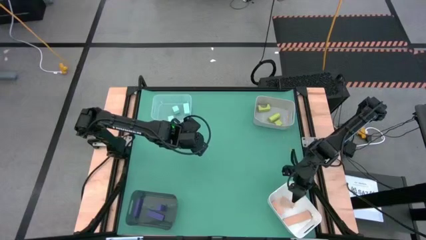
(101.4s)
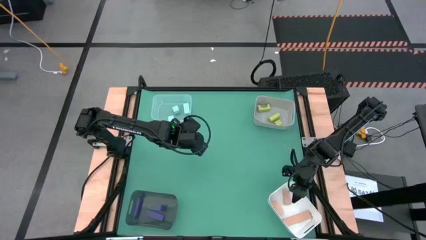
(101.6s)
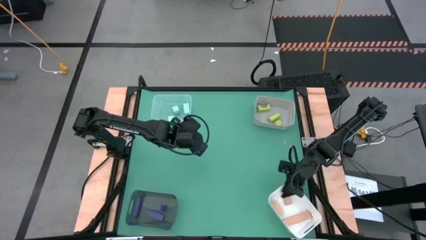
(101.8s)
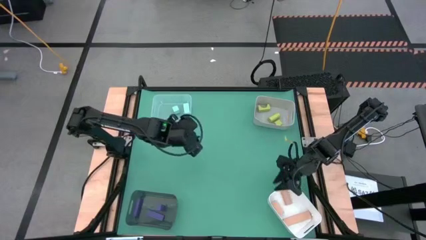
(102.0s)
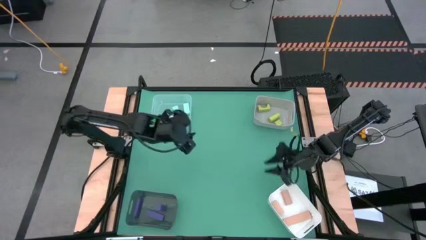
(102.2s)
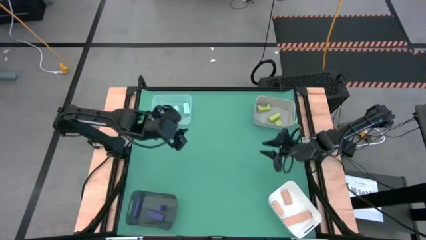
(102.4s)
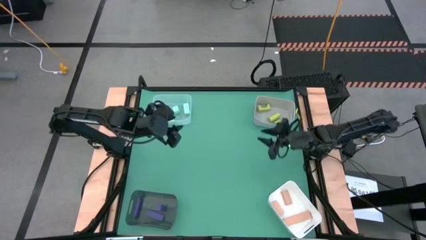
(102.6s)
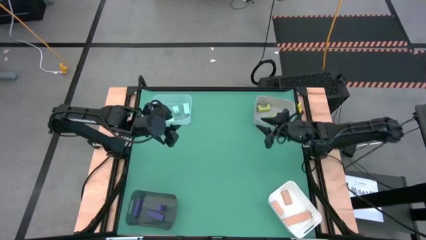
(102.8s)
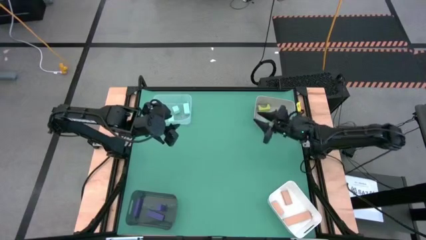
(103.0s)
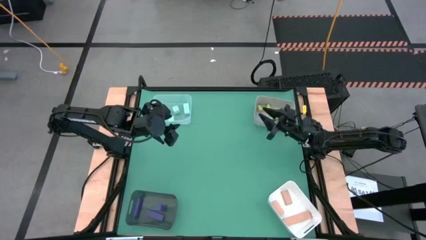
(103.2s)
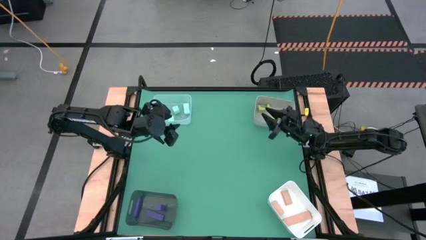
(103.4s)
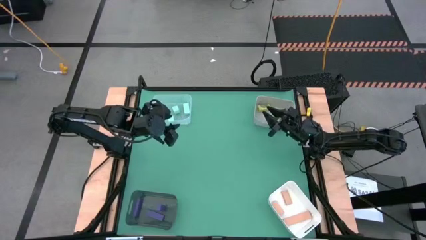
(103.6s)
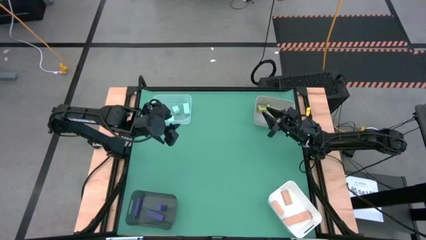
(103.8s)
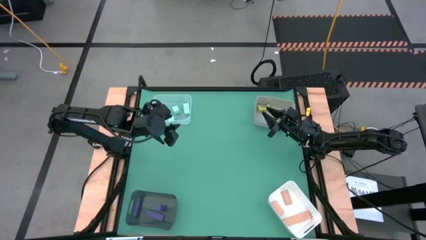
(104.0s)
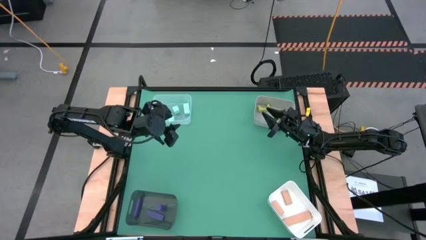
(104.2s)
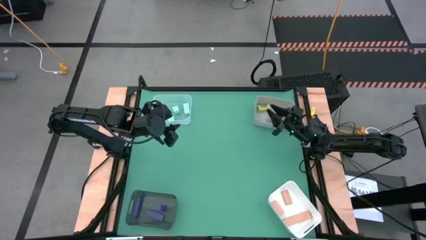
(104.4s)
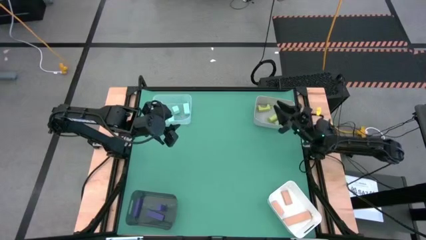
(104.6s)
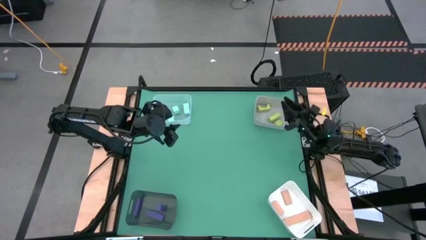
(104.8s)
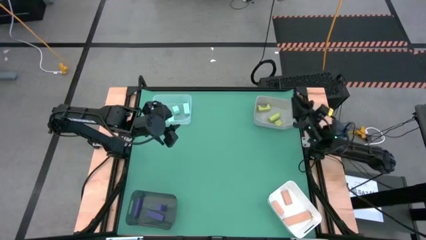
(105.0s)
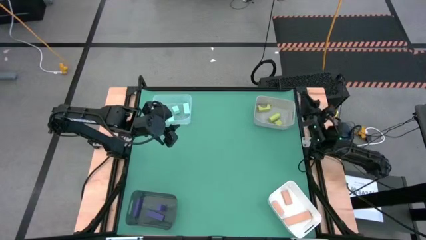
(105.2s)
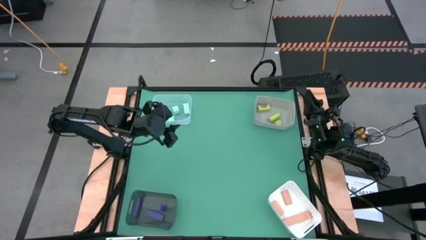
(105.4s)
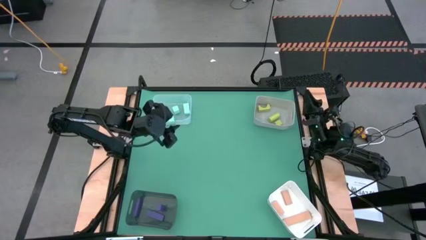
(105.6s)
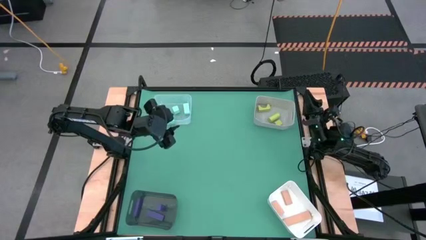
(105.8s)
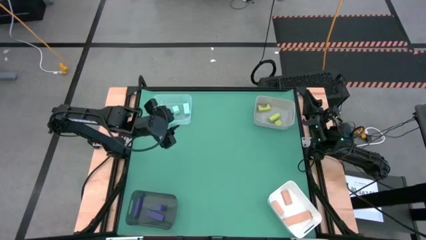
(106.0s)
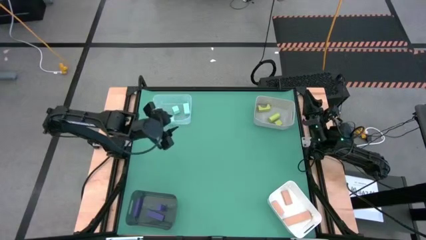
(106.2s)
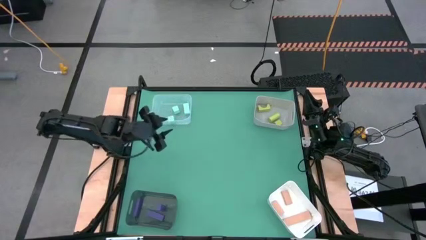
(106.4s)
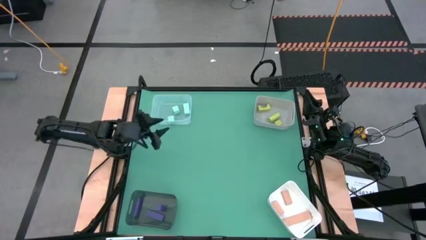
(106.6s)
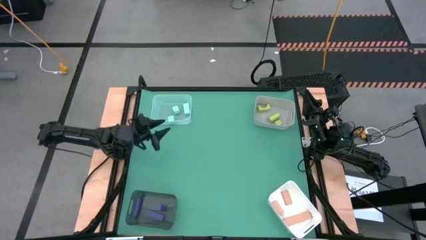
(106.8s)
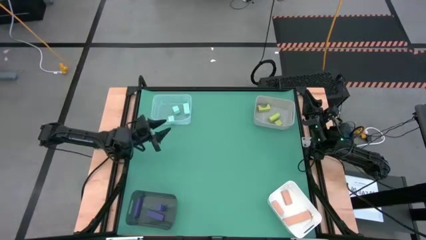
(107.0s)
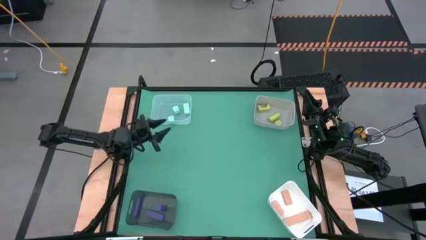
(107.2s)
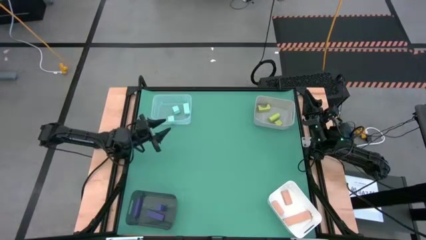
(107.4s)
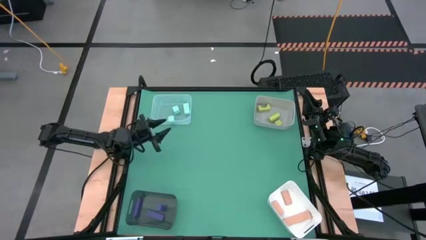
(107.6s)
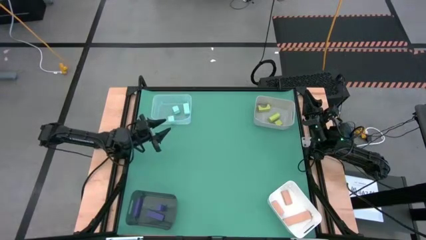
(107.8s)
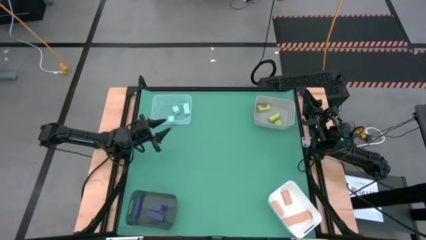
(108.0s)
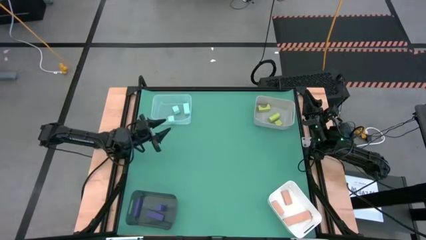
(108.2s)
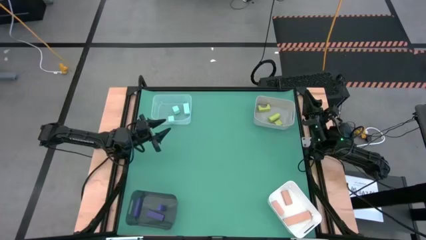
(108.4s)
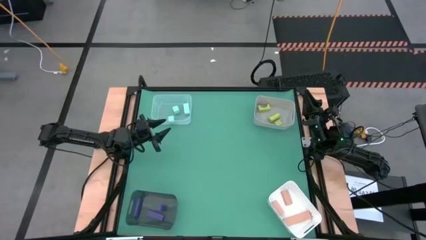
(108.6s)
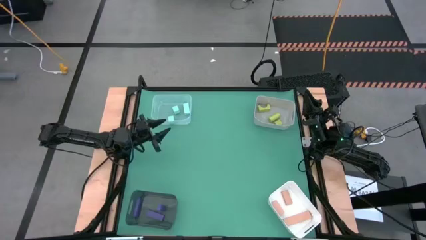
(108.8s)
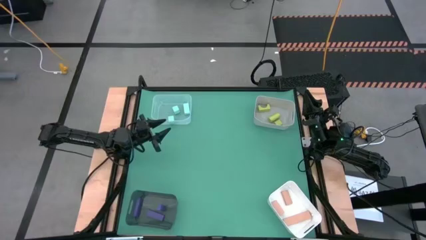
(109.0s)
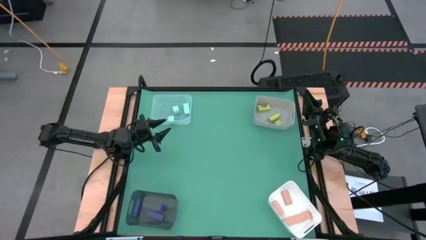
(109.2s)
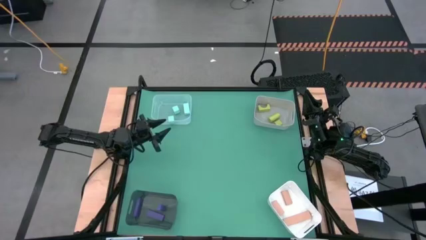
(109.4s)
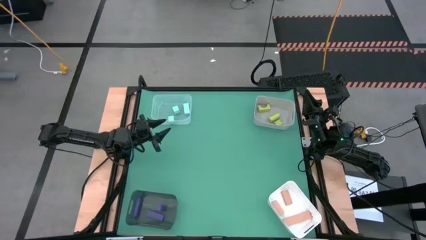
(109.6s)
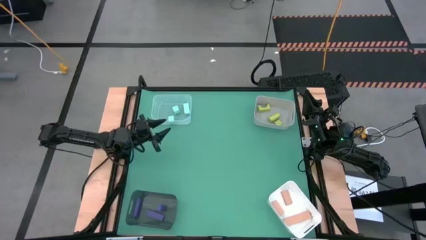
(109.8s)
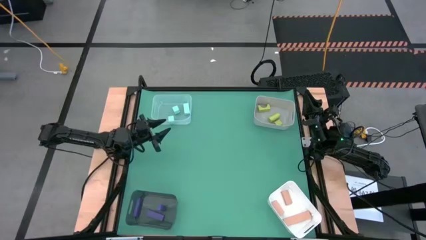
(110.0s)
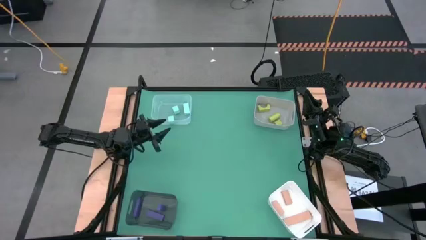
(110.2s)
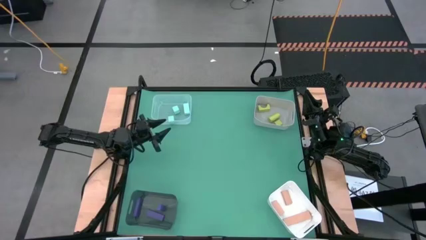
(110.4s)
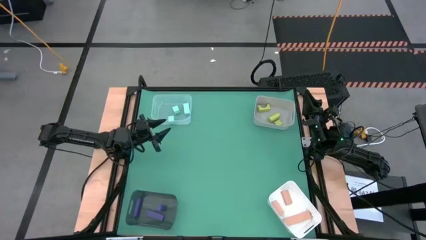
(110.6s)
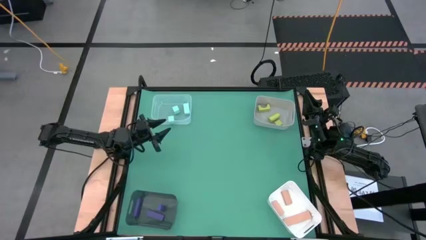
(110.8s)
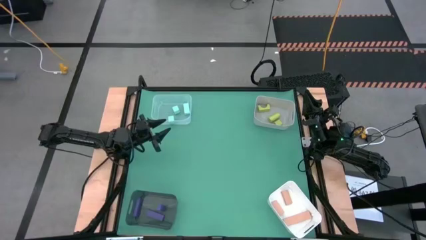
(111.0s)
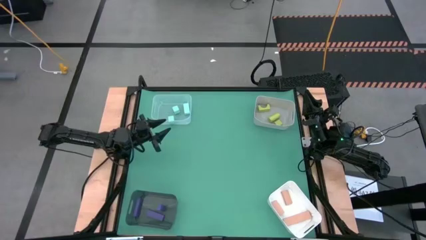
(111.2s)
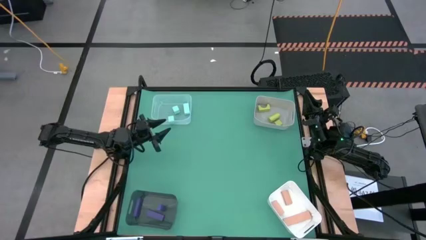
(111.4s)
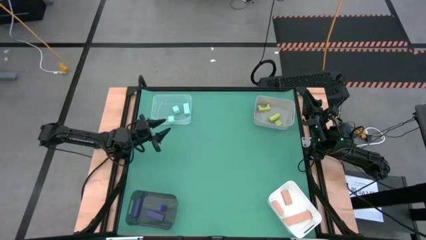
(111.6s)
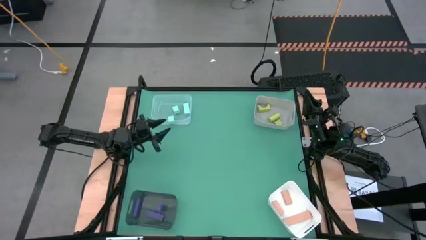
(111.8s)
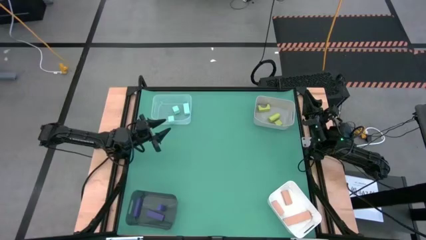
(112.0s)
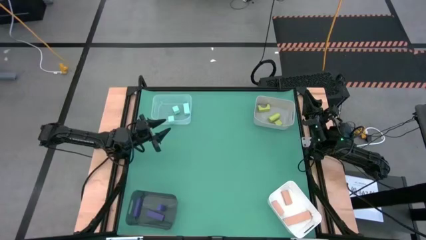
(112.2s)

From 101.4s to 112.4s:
Task: Sort & place blocks by color
Return to Home Position

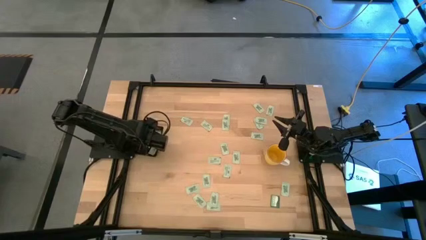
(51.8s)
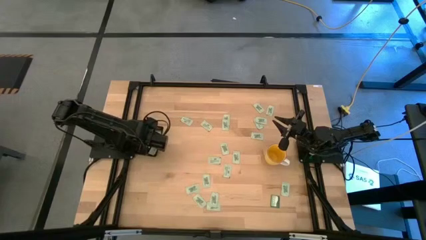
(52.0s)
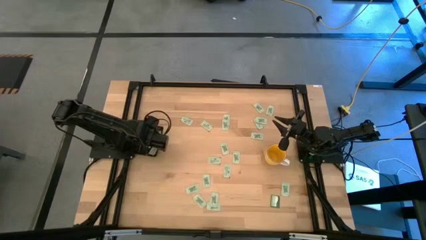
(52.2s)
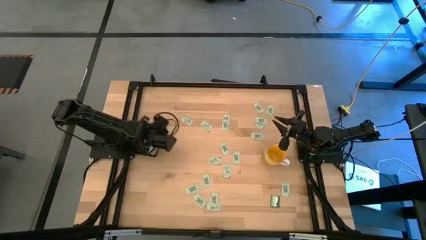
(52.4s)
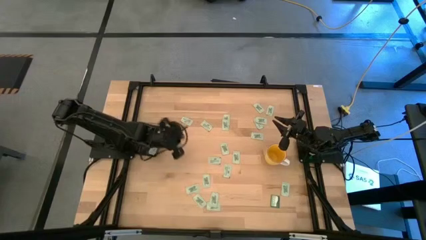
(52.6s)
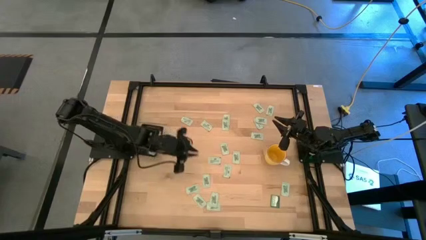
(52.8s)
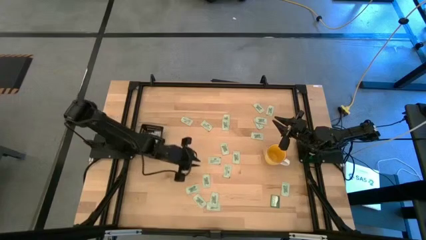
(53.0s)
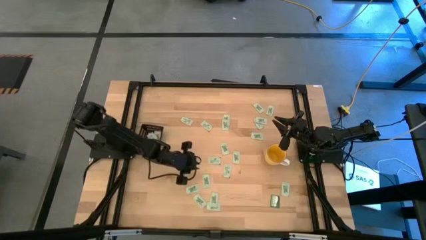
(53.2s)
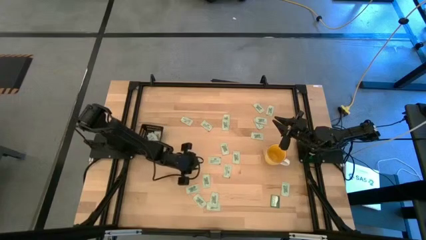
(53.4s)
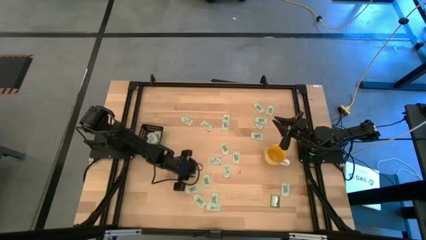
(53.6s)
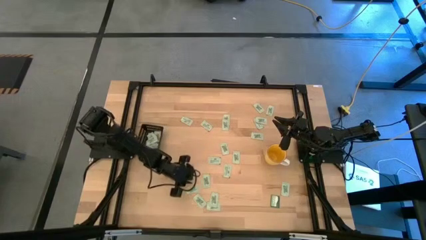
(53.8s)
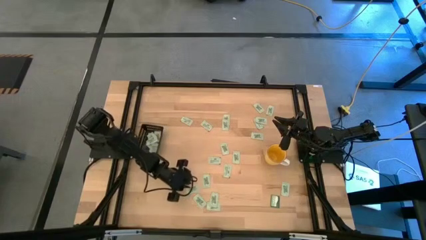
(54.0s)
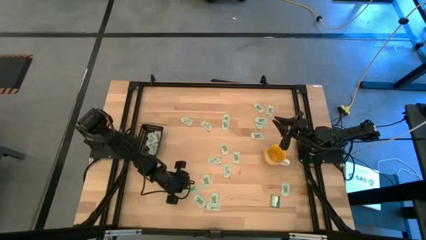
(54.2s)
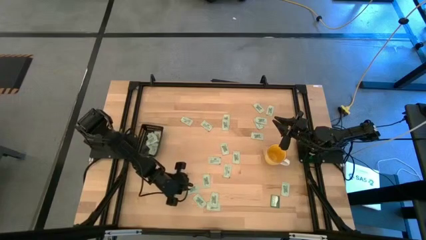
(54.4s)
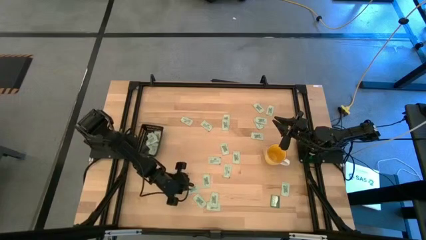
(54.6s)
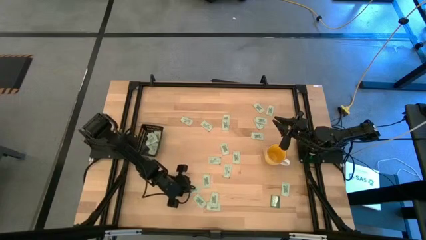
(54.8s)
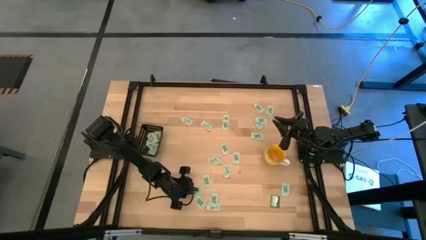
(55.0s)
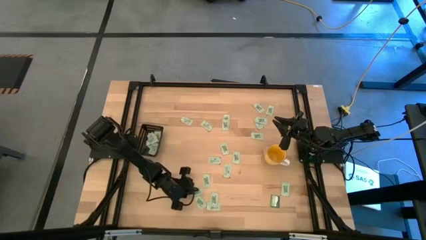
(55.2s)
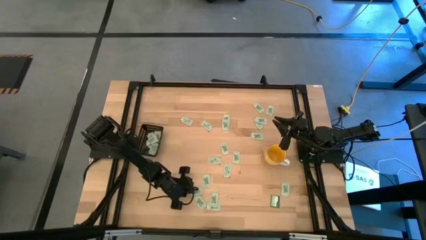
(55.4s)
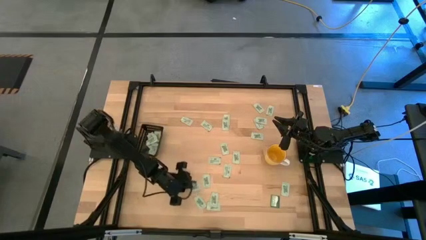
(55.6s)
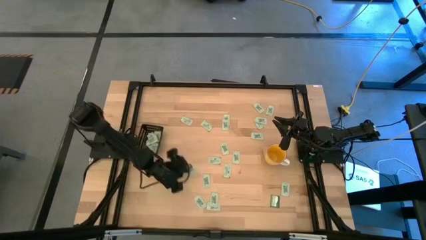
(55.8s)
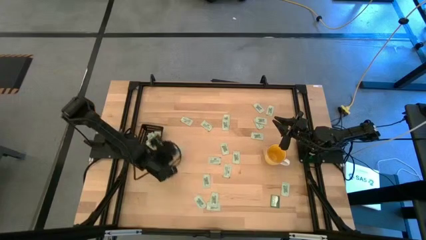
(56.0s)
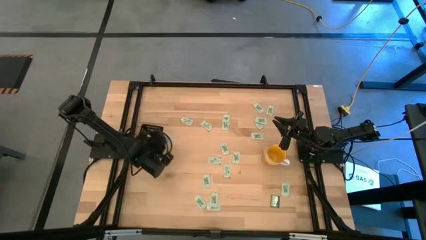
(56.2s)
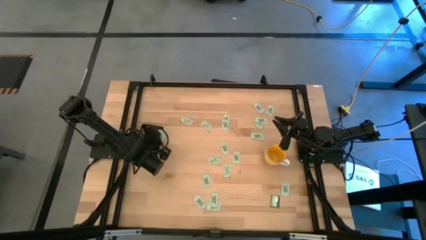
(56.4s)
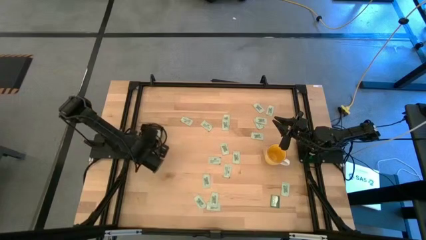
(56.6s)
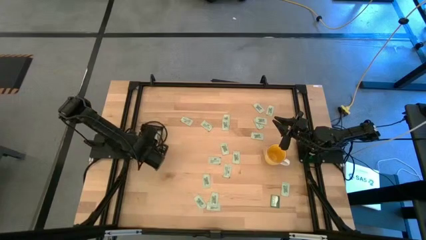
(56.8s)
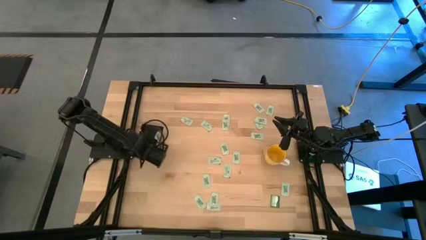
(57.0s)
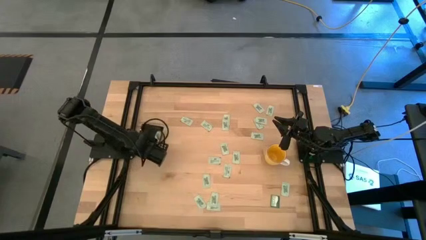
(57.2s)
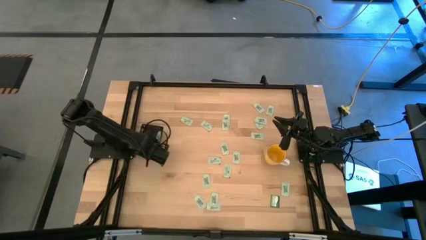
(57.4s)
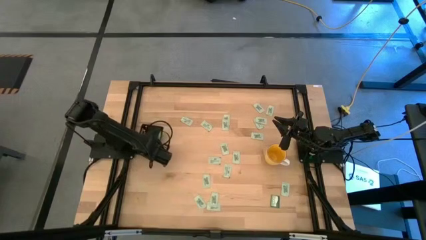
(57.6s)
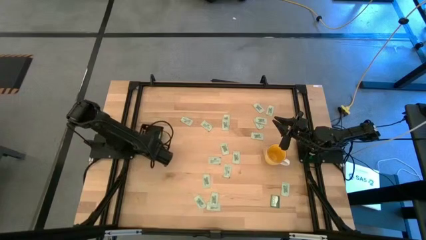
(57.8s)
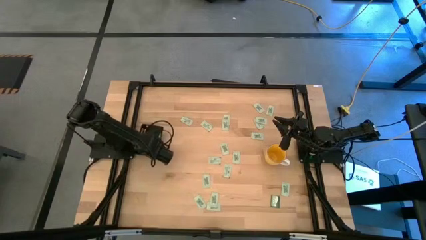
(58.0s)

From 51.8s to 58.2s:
Task: Pick and place Stevia / Truvia into bins
Put the stevia packet into the black bin
